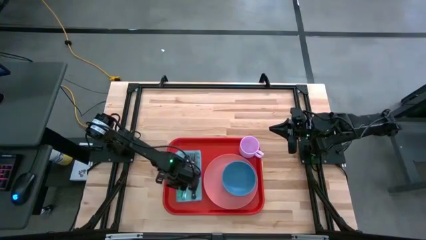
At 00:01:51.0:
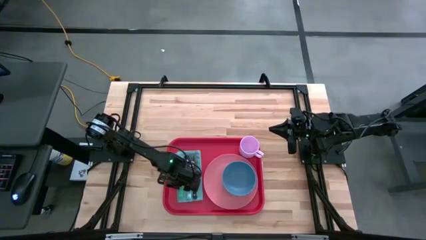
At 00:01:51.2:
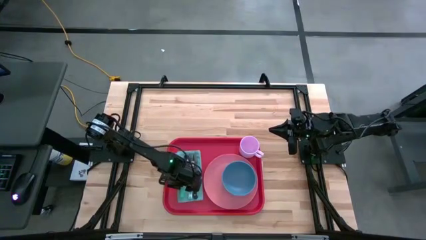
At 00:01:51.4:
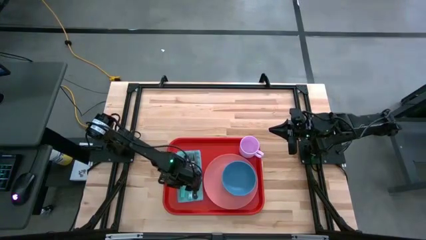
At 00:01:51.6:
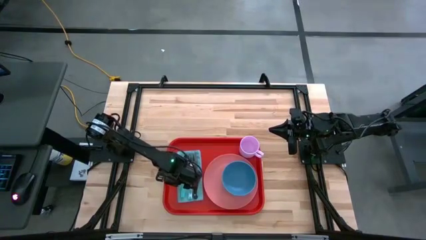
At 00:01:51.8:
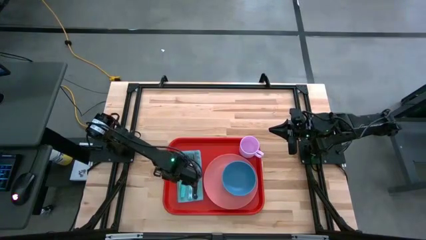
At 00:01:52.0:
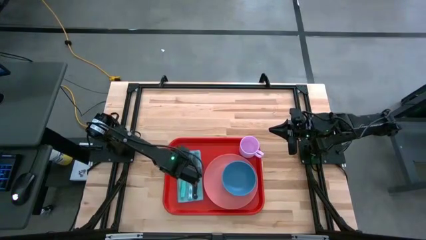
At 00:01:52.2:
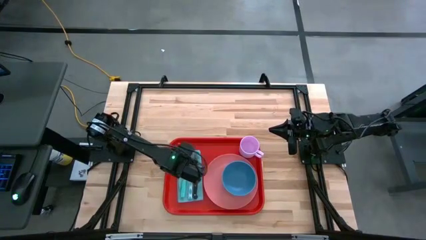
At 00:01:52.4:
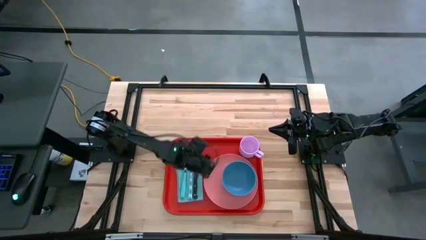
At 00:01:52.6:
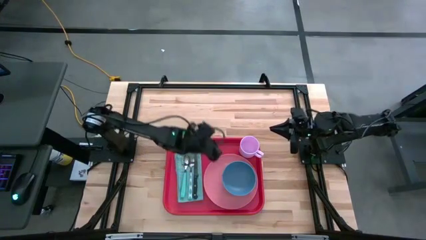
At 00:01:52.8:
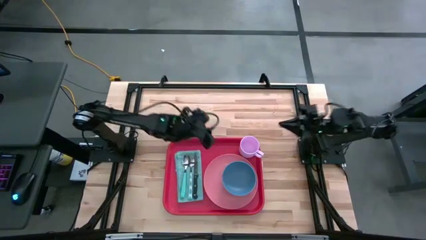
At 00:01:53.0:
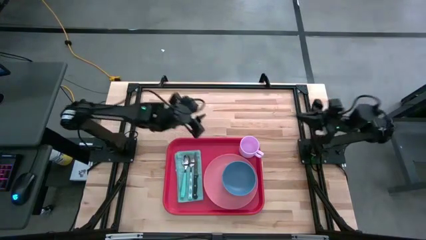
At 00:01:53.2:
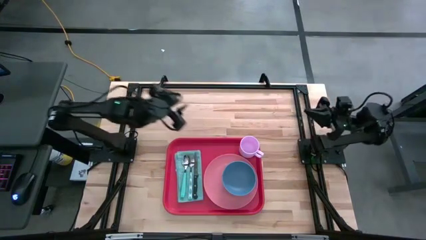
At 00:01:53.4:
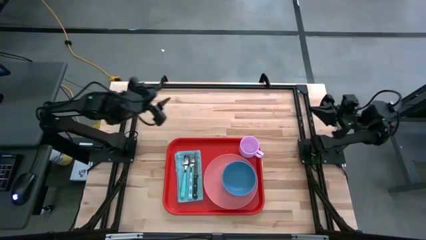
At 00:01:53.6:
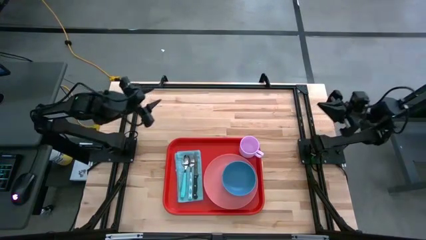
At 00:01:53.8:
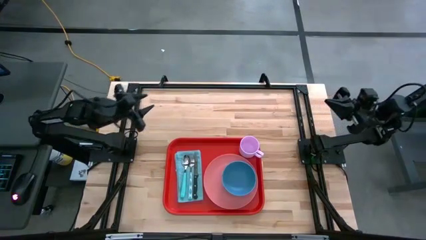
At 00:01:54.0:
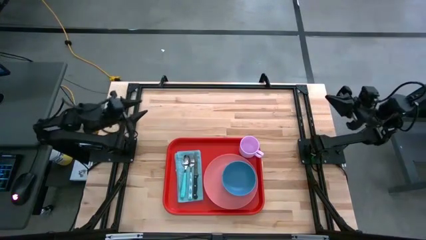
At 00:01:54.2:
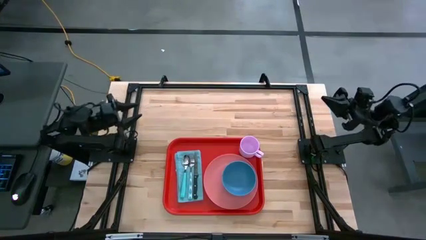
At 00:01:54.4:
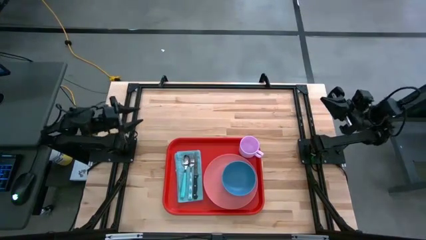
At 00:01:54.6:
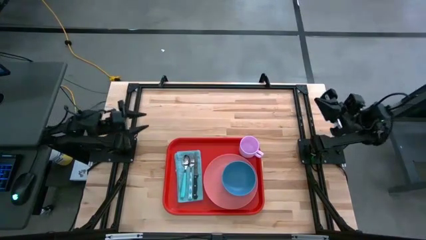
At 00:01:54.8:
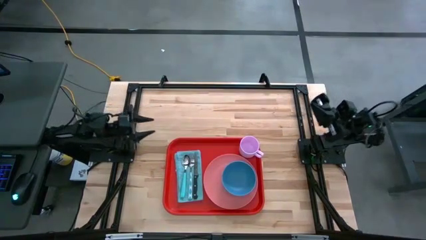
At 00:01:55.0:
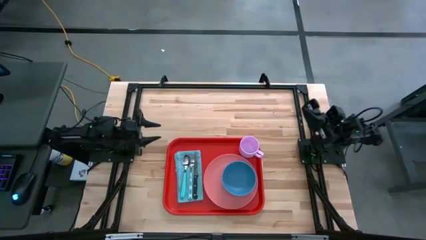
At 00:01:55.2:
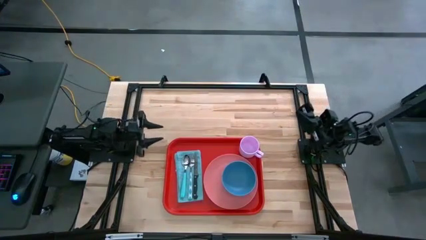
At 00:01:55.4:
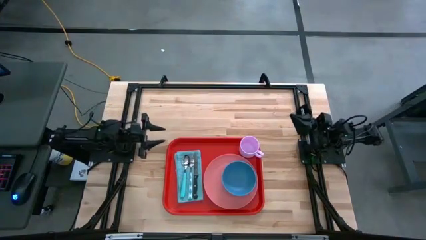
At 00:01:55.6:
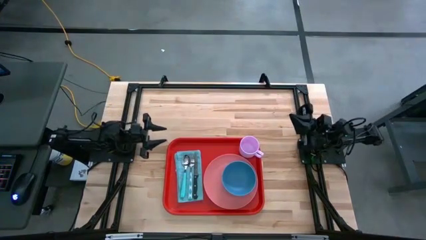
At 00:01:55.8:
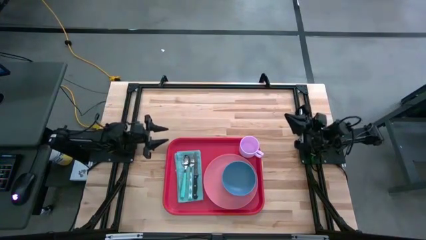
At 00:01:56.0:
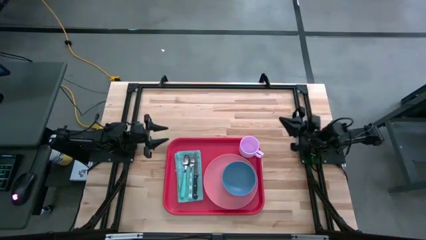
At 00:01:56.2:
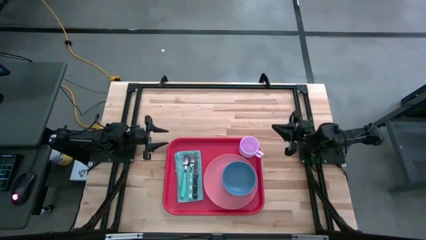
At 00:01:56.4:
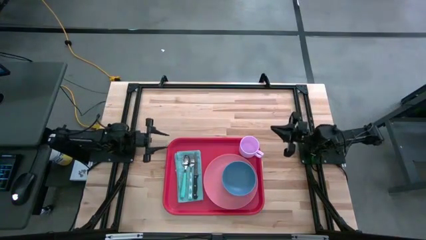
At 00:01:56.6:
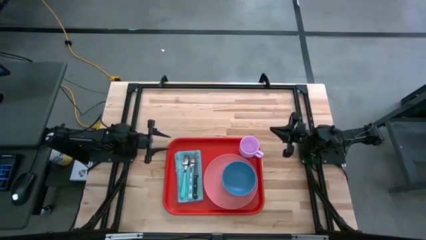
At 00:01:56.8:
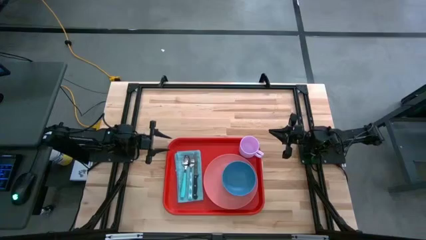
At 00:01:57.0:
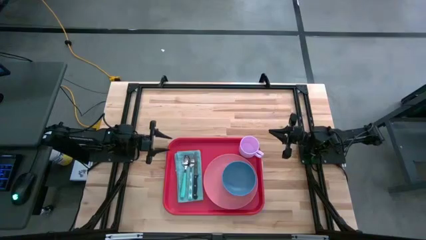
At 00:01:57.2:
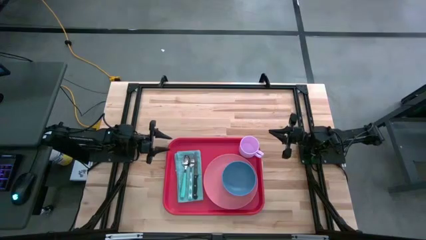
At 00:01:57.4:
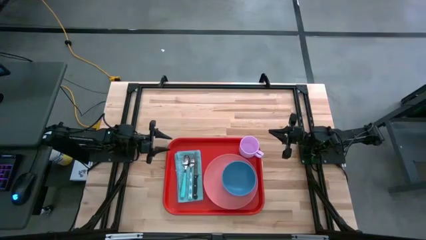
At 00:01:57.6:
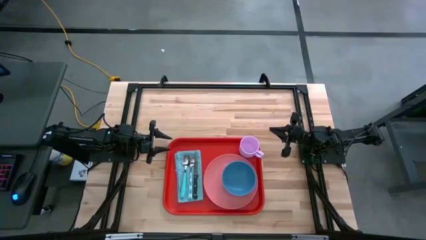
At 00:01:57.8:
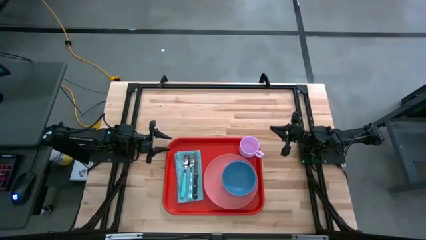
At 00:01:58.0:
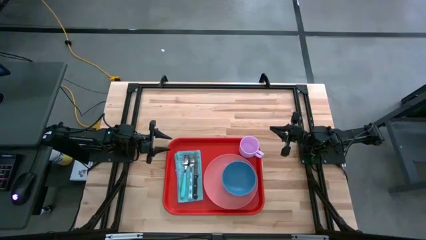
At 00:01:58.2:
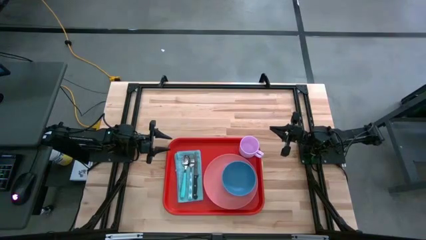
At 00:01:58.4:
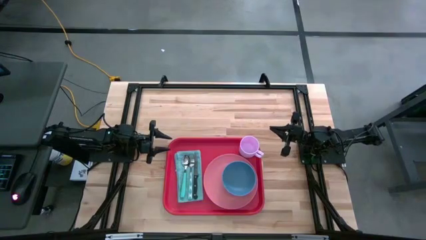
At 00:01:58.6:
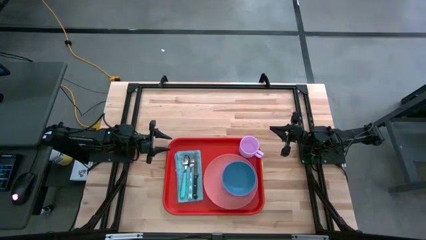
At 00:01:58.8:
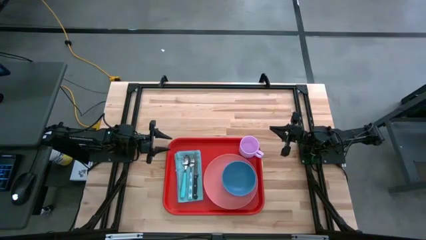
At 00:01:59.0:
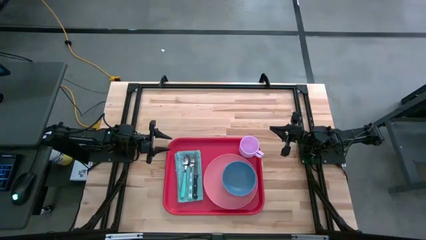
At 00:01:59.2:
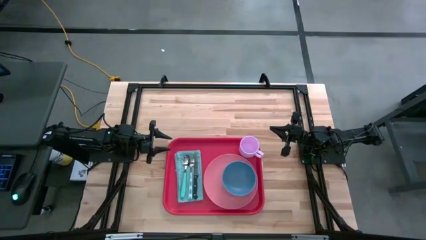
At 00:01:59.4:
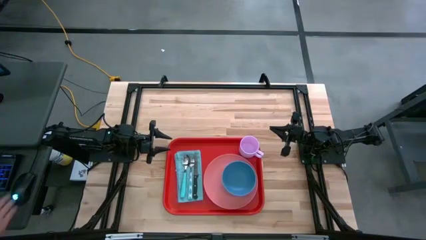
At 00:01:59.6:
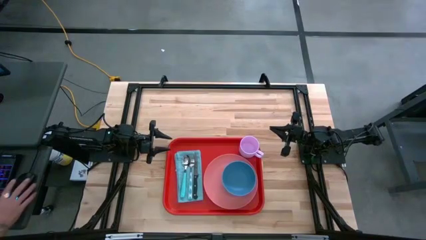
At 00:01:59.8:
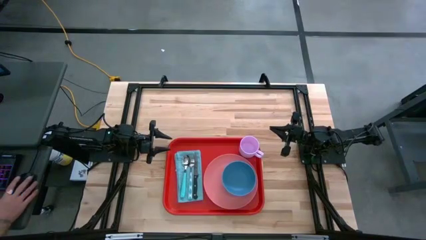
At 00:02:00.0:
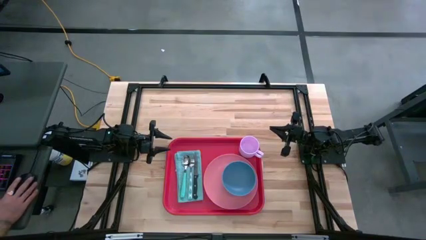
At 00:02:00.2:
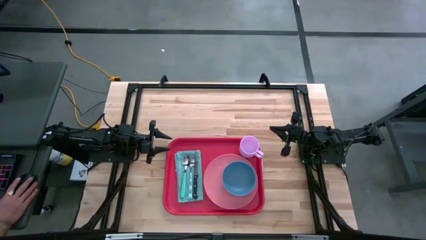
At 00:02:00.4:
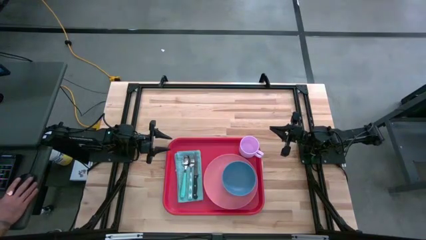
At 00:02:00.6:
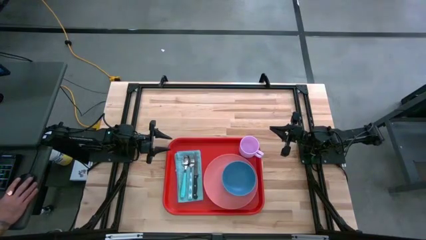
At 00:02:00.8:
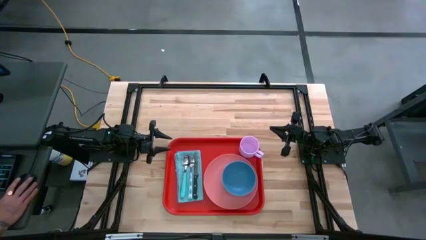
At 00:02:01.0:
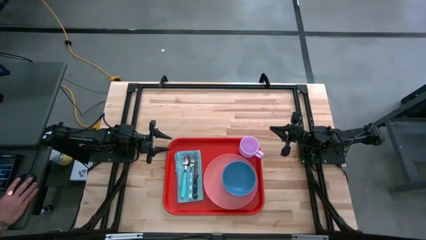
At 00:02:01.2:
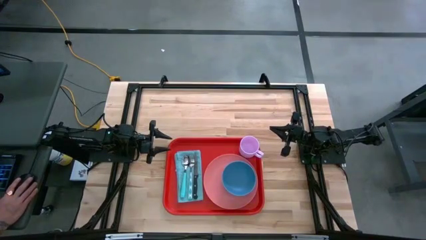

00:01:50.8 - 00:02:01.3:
Task: Set up tray
Return to Home Position
